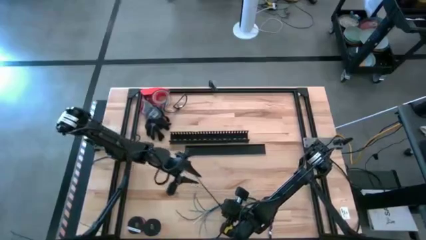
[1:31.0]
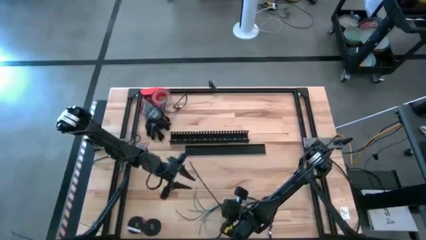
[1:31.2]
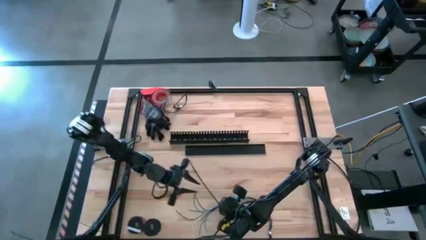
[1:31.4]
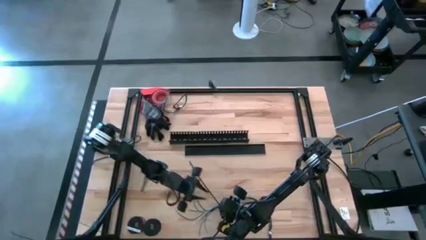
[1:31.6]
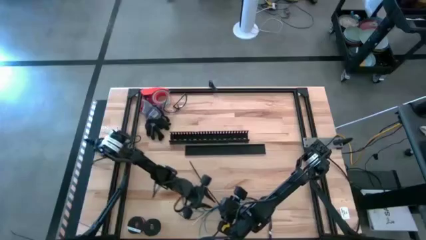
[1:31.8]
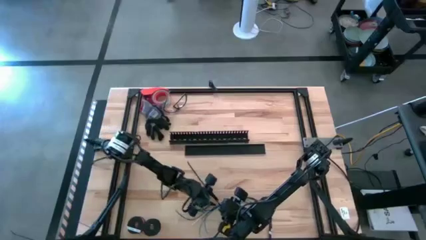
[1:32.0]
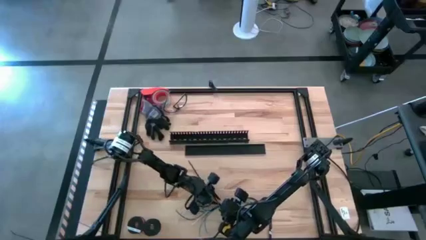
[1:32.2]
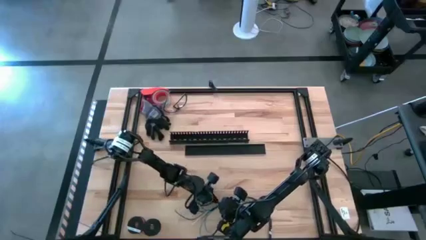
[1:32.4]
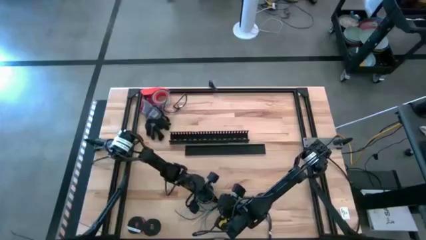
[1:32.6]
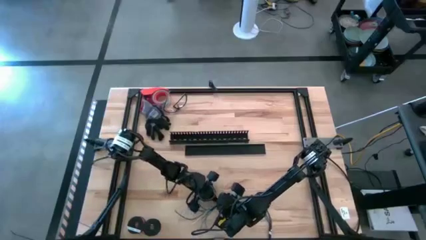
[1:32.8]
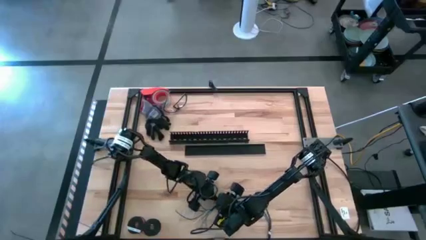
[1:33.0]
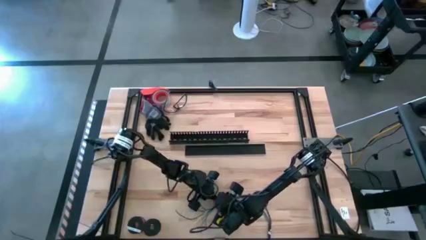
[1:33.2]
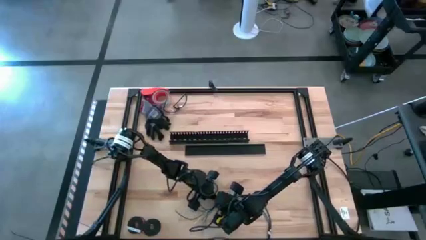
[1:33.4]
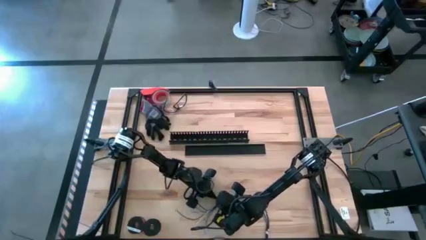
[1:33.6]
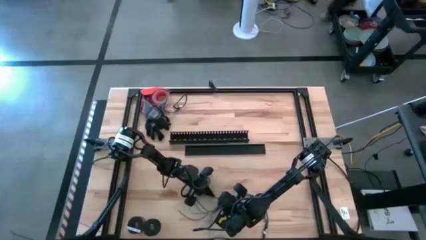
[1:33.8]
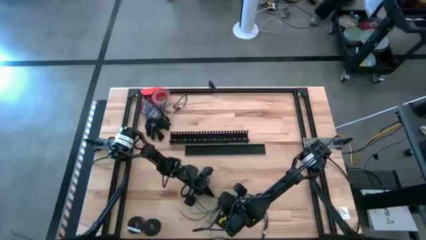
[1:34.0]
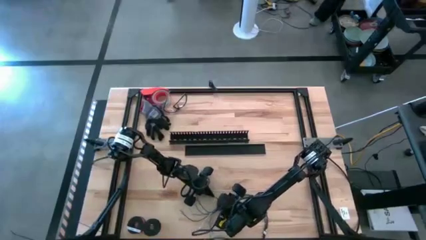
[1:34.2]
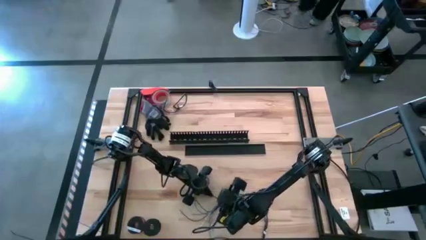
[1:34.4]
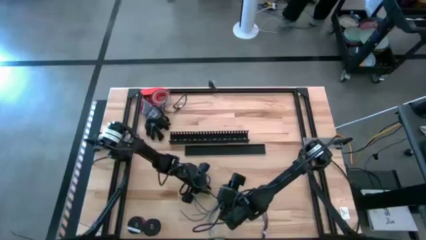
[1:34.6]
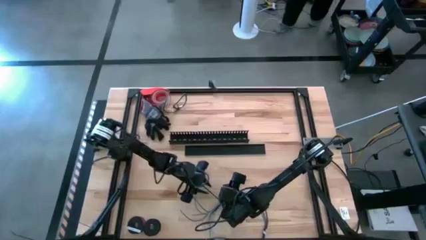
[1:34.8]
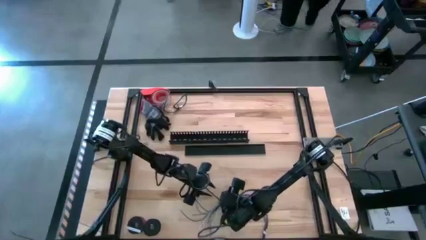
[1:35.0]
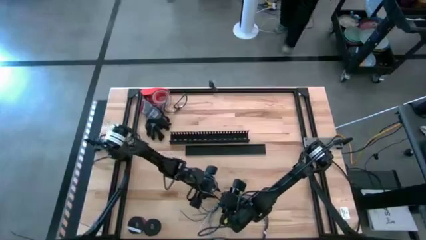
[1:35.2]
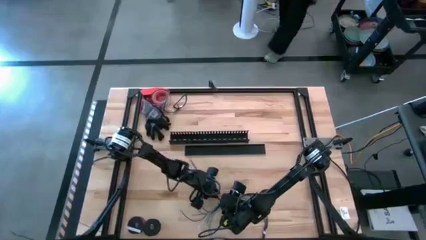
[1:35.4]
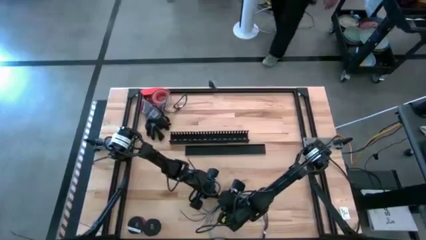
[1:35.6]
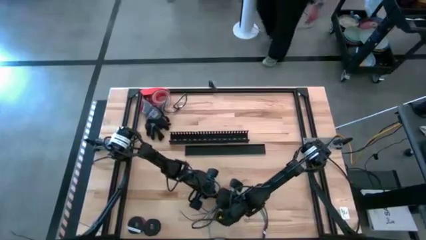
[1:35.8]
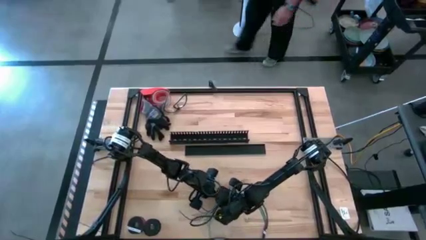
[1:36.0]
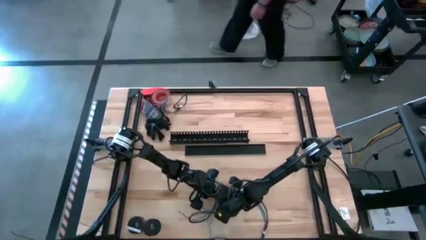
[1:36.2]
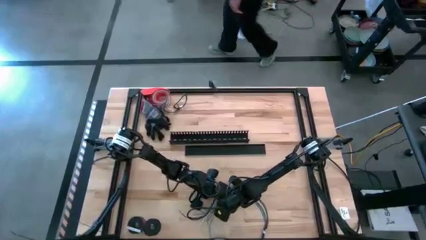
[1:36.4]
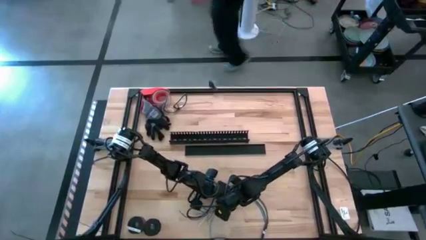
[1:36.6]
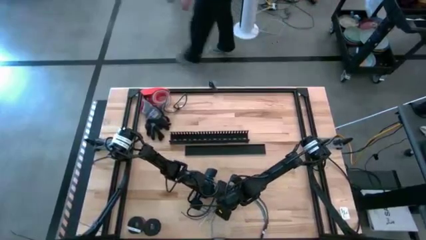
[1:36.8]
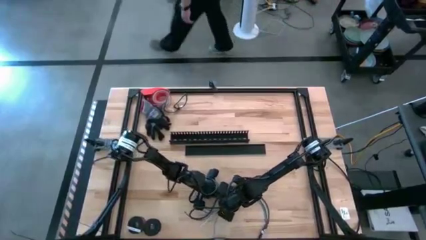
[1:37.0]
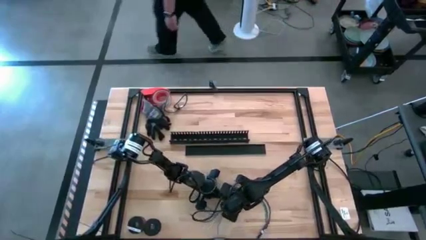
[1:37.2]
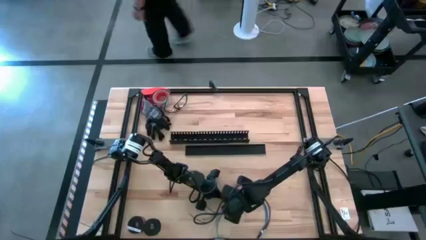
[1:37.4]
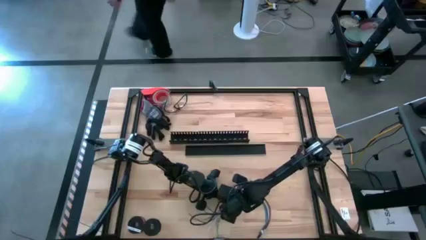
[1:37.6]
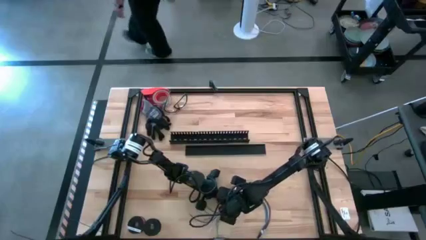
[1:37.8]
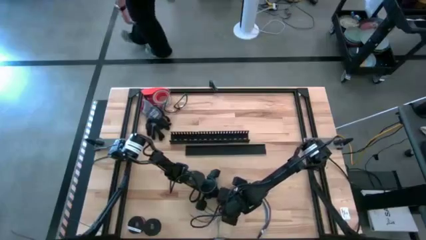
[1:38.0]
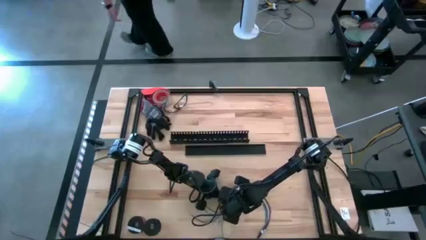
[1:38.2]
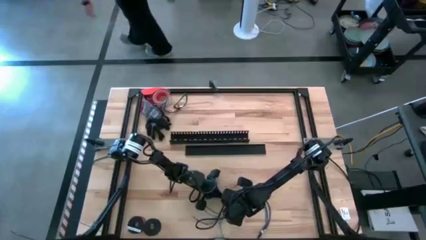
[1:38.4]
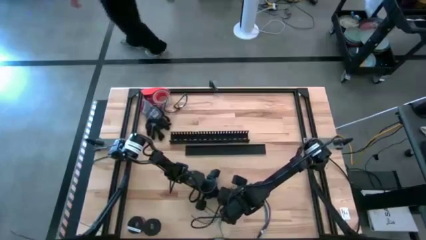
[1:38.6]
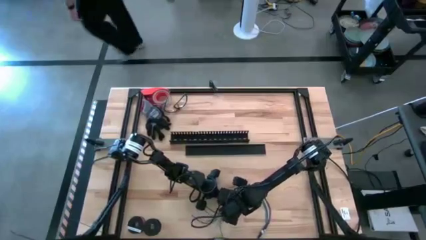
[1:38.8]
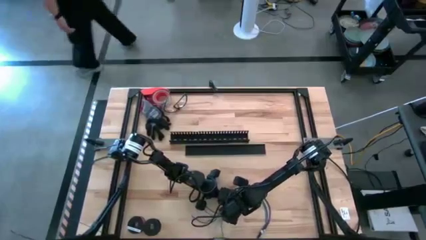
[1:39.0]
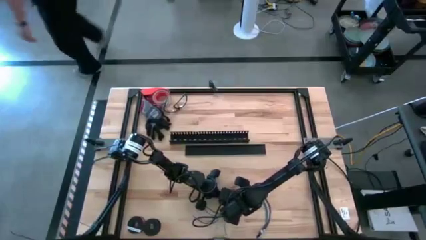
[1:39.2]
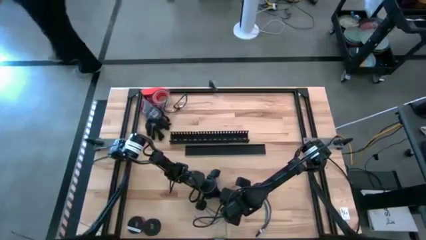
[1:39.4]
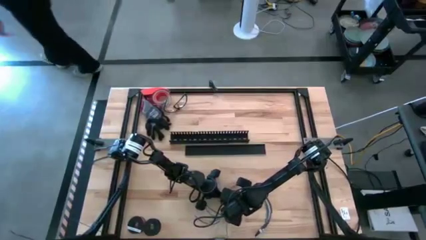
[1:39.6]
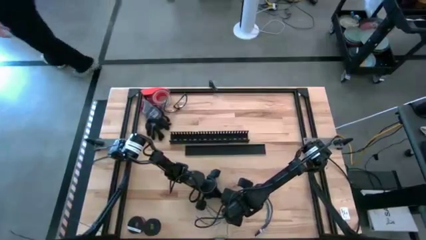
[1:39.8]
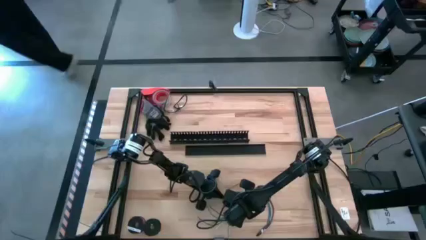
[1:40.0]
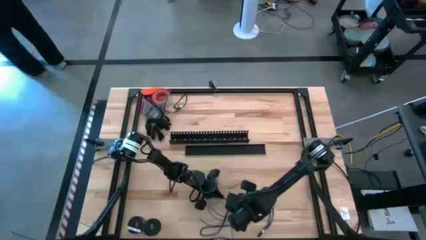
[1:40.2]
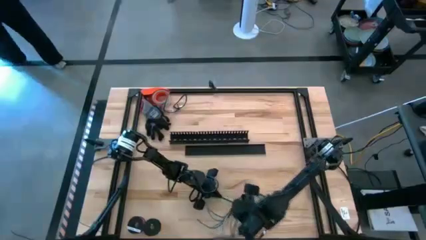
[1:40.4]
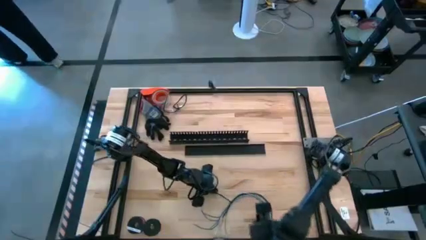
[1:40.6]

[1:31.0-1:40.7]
Task: Ziptie cables
Wrap the cable wires with the black zip tie

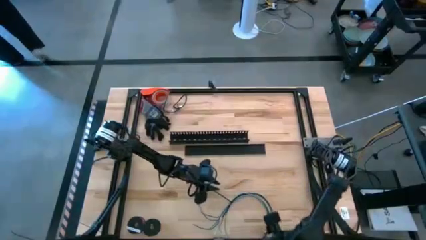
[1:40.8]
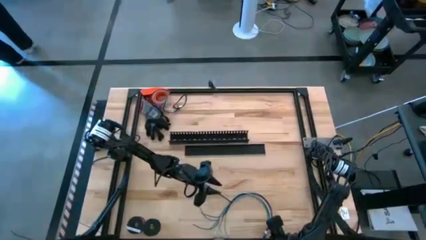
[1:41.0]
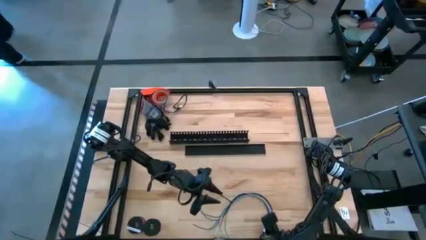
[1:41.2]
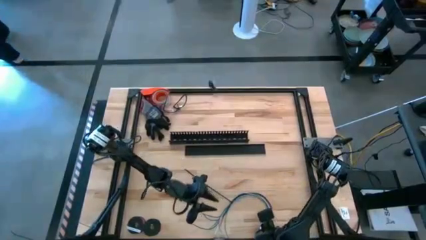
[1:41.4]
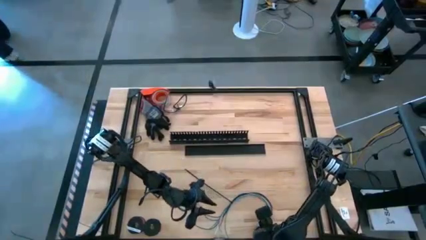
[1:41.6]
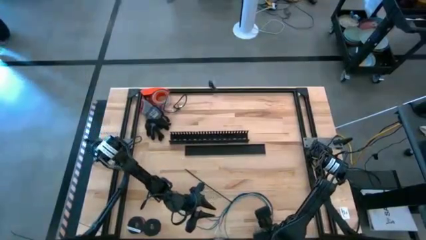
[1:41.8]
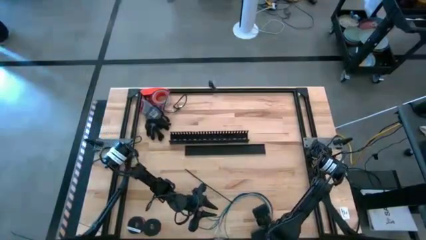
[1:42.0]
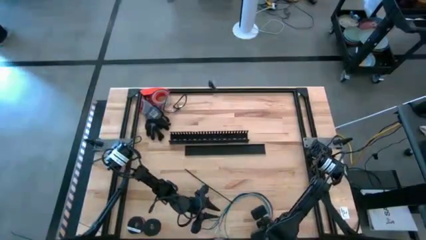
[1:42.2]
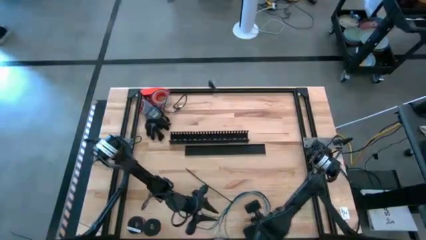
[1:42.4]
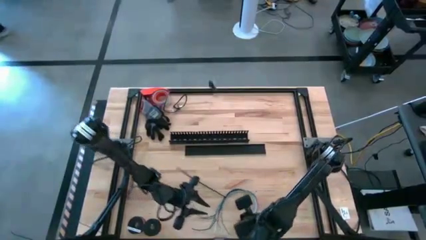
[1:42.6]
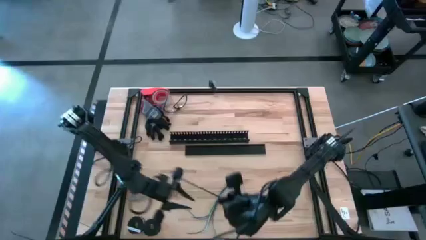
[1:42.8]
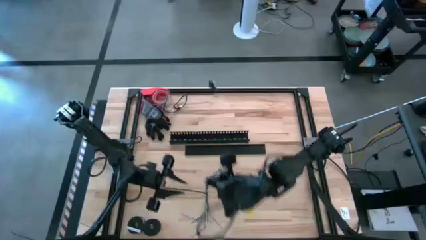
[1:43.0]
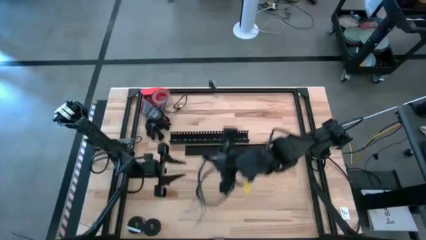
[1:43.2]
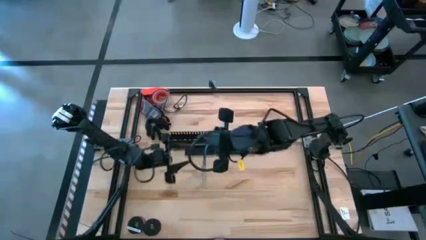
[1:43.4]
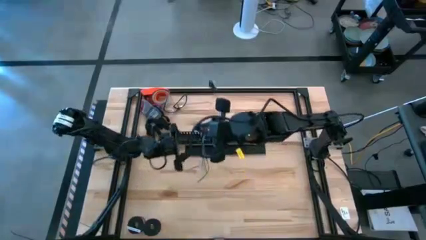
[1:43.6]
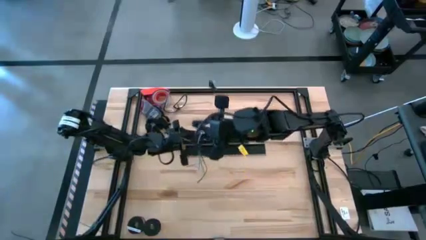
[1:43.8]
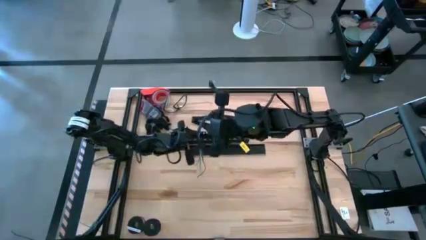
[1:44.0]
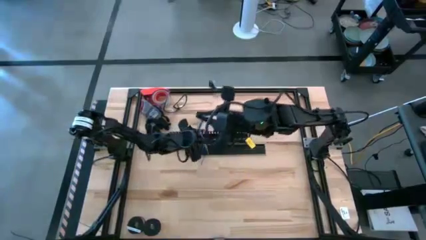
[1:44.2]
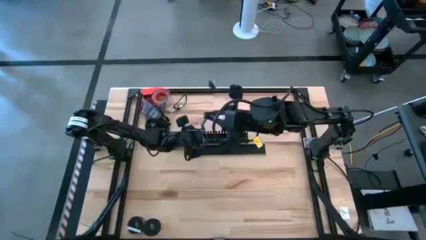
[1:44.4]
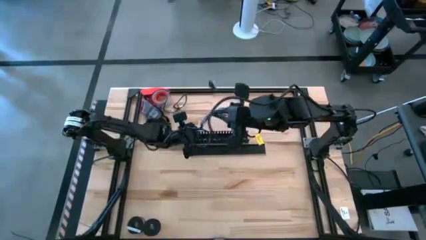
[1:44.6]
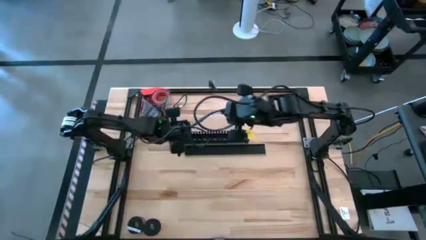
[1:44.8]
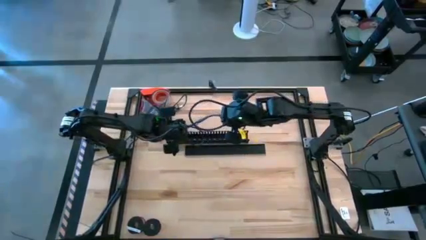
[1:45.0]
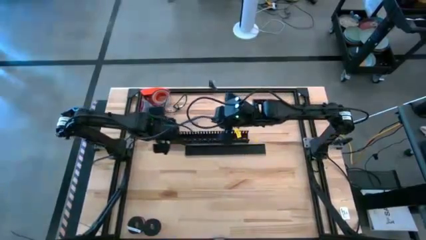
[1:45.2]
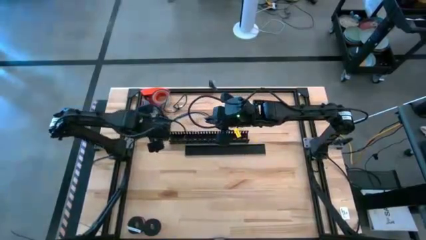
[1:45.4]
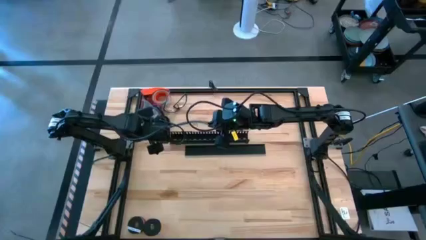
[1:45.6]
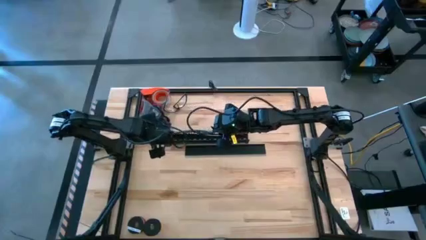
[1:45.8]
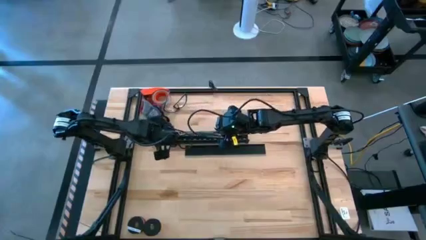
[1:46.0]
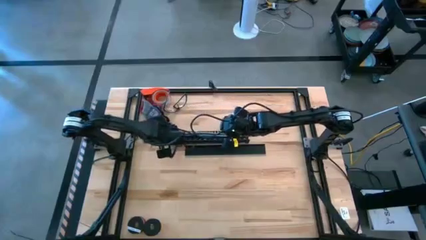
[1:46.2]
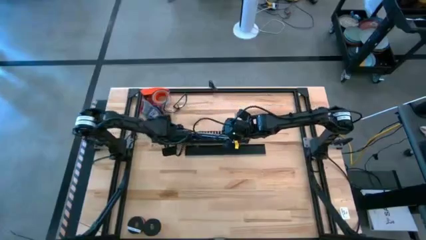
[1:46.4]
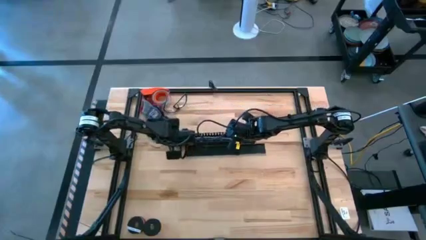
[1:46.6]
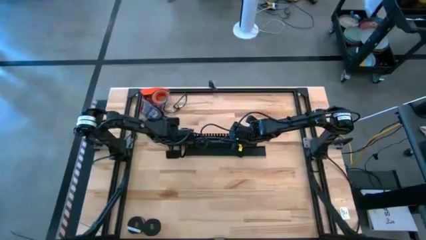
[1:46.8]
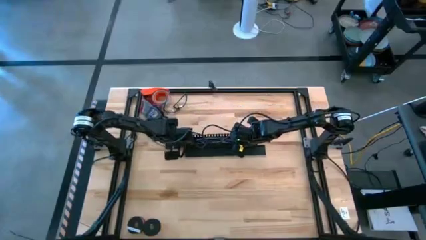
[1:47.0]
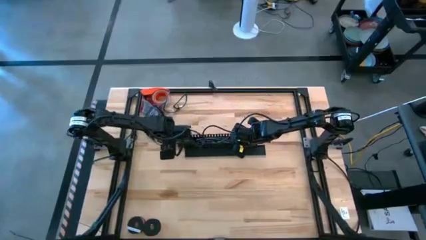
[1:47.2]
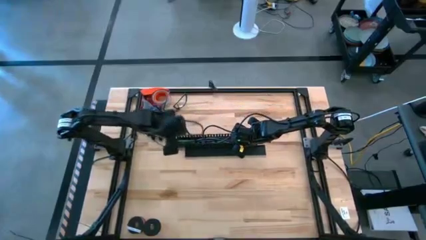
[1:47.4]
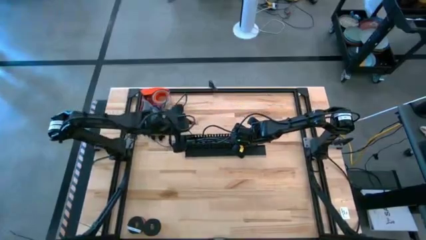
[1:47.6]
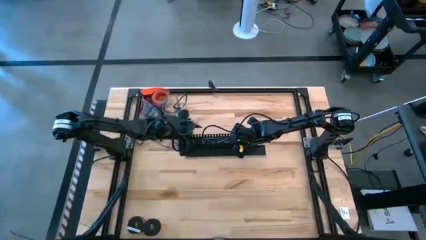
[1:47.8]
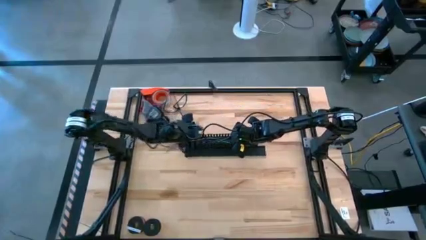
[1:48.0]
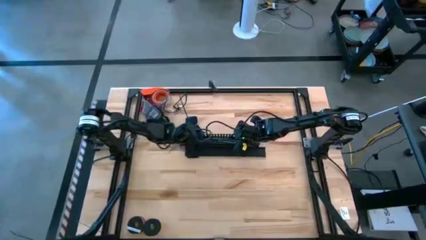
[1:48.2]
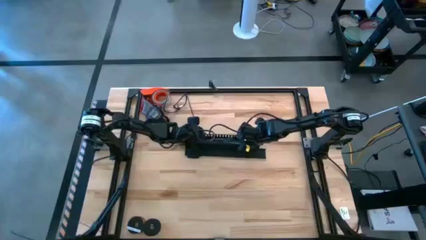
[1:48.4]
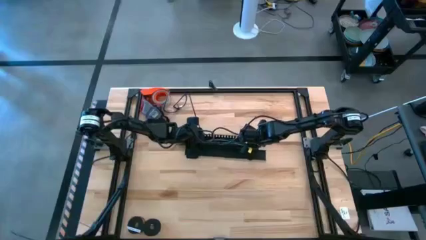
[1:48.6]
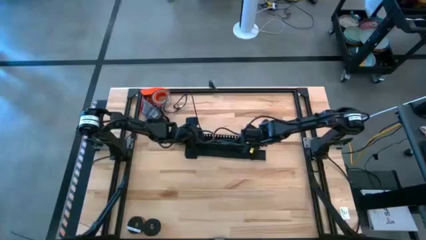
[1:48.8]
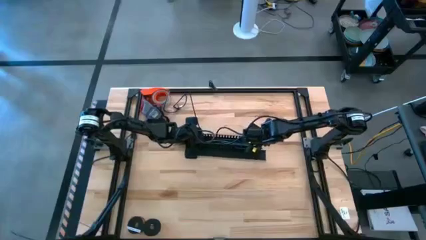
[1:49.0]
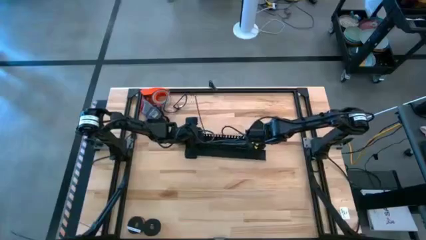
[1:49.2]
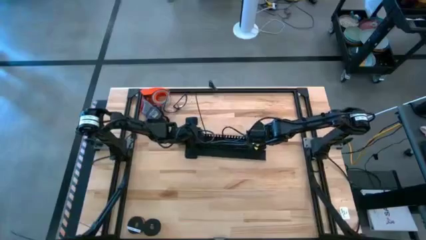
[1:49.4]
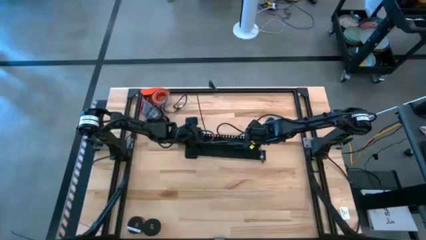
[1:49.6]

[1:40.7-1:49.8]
Put the ziptied cable wires into the black cable duct
